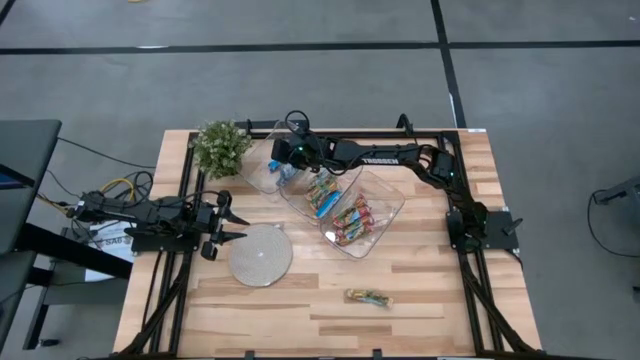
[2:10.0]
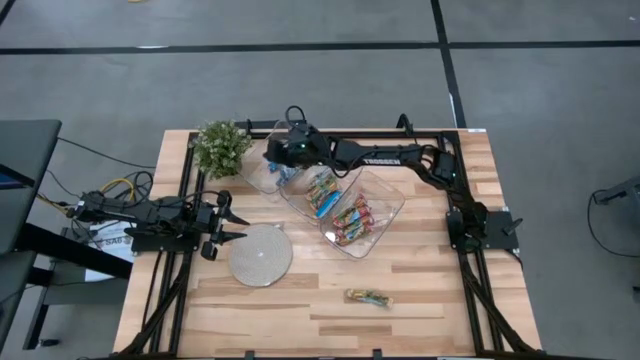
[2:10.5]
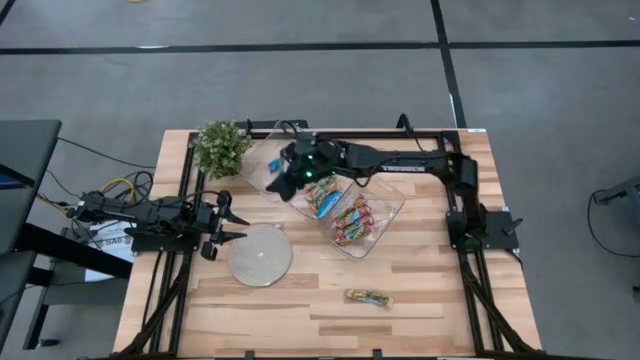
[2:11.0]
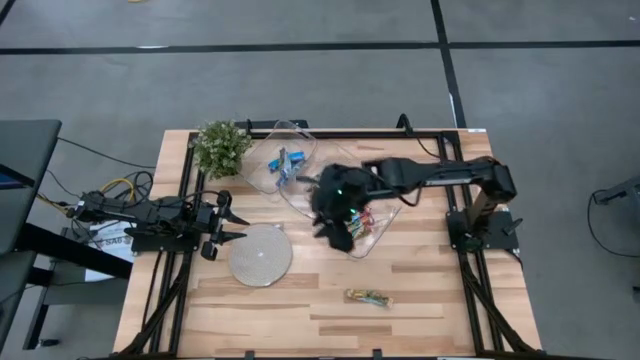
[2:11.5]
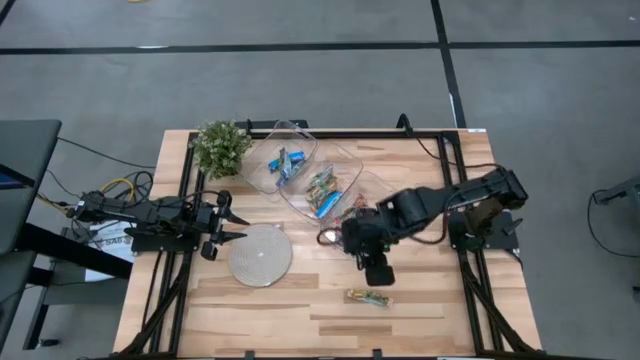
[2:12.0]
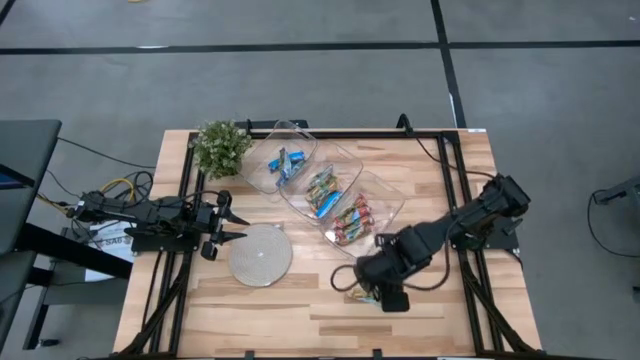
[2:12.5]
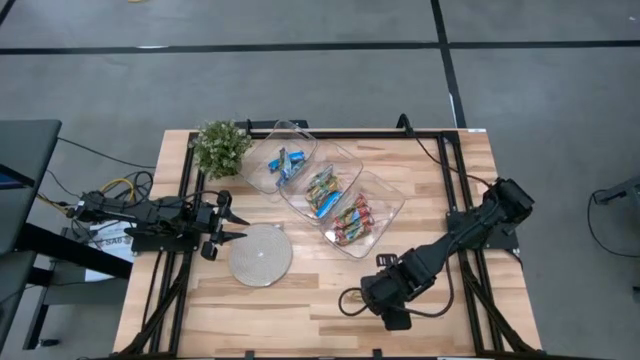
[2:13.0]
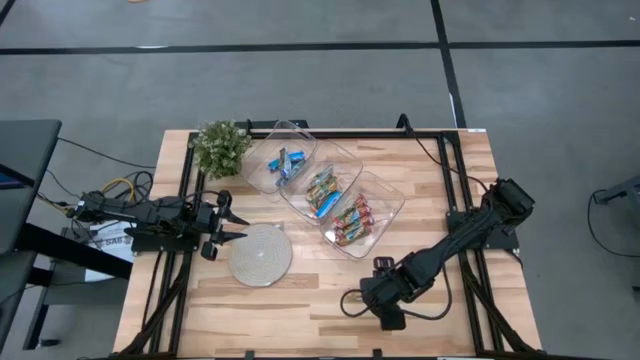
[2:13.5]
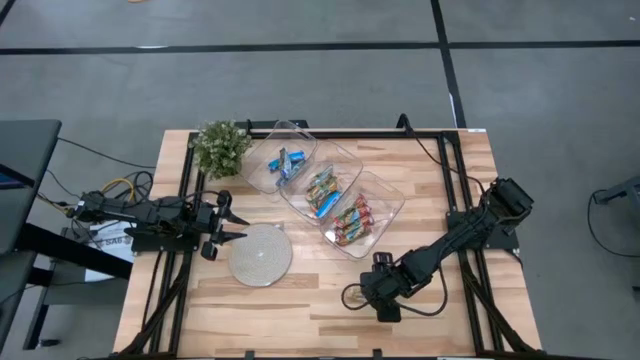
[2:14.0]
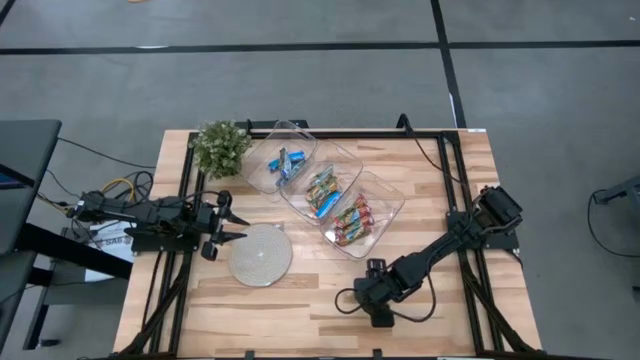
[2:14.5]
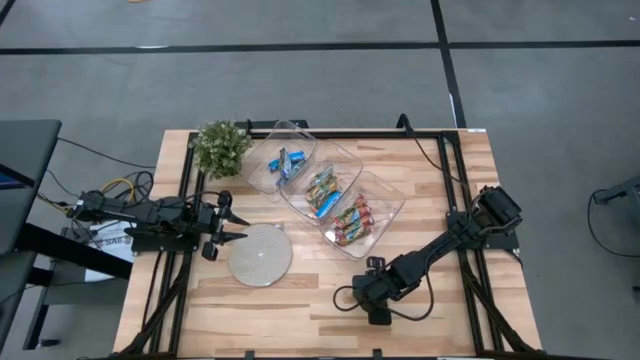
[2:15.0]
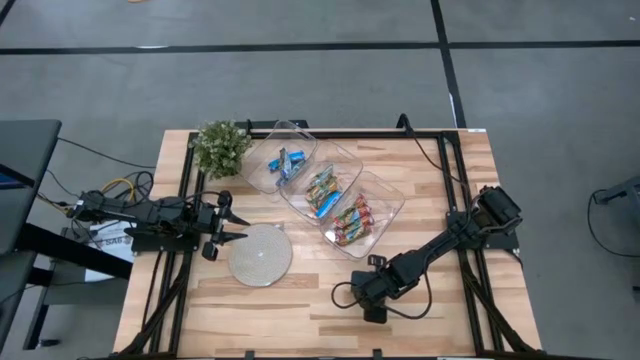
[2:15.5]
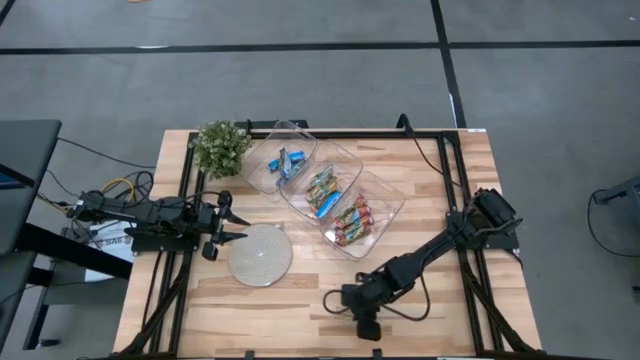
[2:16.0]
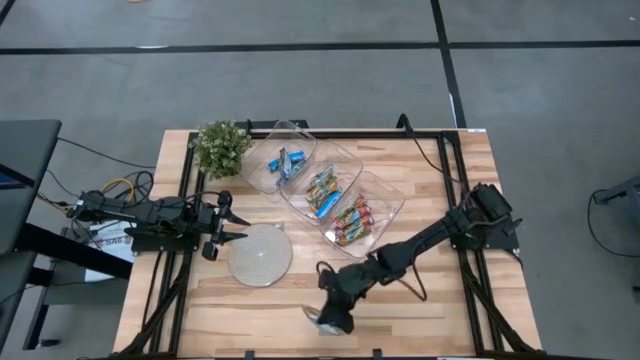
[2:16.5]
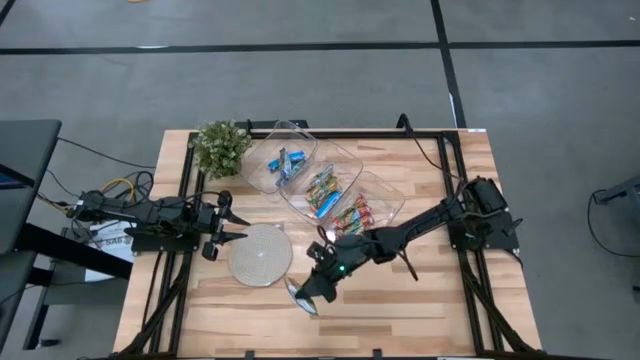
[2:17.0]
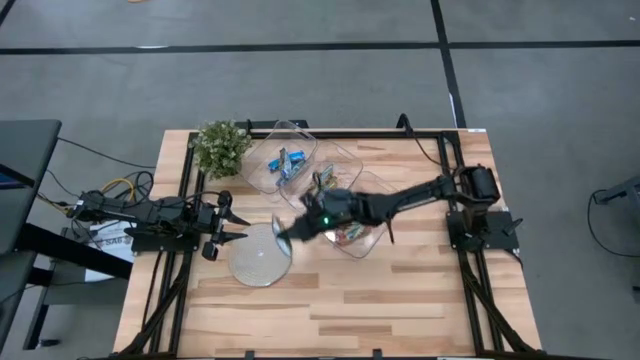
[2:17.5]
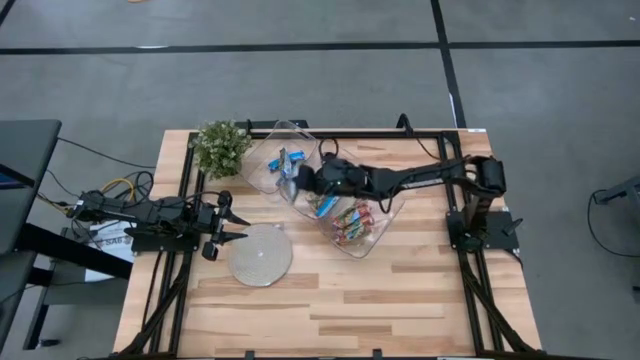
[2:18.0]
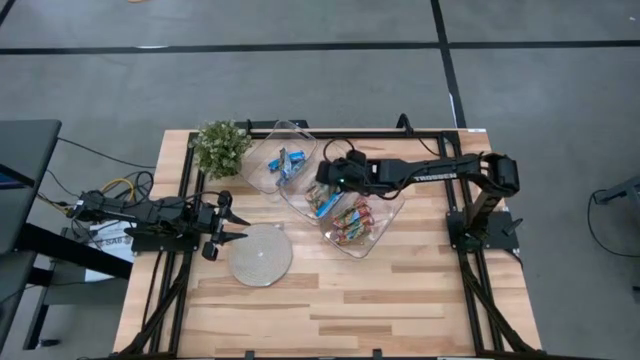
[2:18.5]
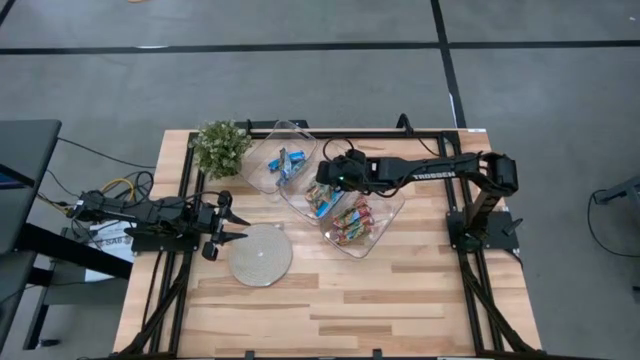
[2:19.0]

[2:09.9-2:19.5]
Task: Pick and place Granola Bars by type
Put the yellow granola bar into the middle transparent bin

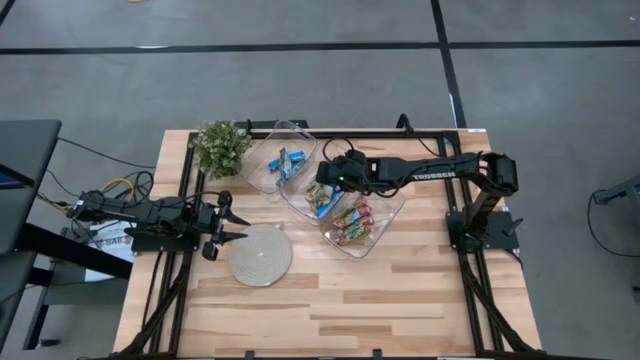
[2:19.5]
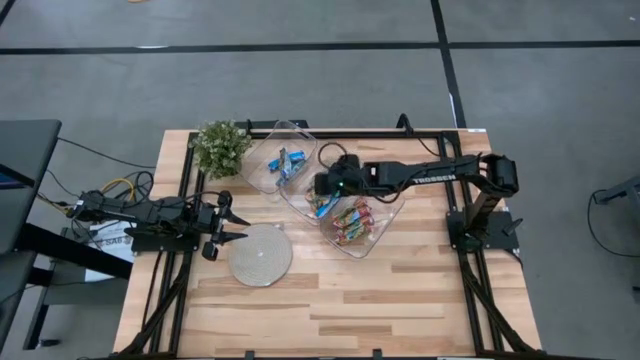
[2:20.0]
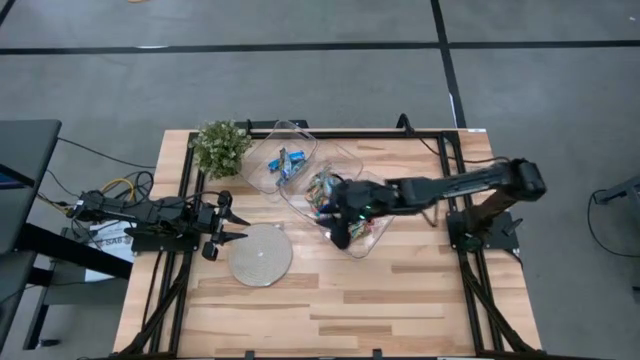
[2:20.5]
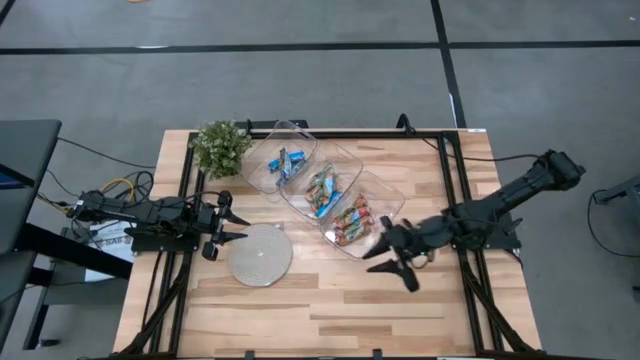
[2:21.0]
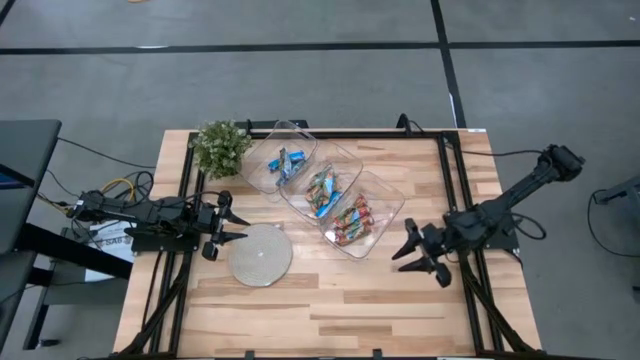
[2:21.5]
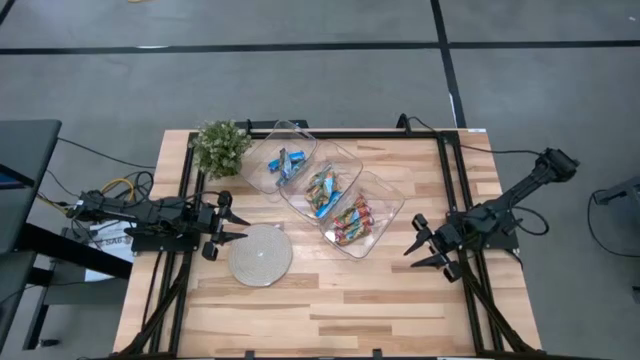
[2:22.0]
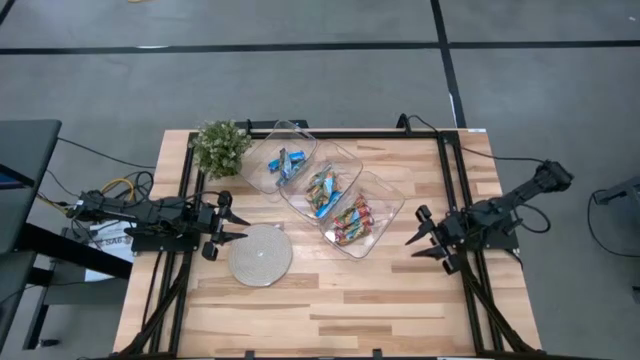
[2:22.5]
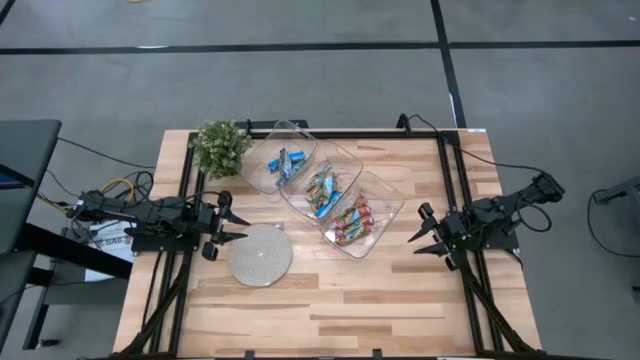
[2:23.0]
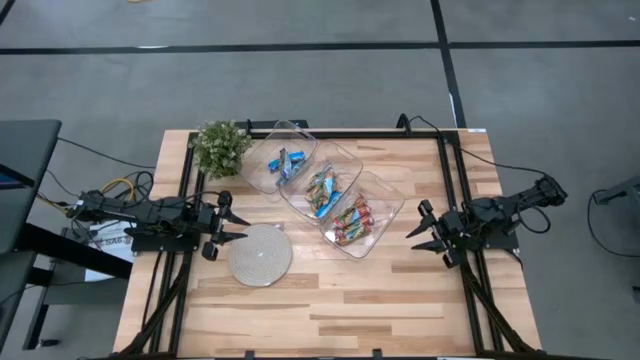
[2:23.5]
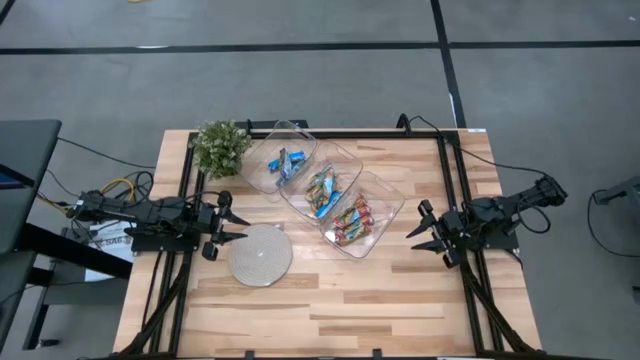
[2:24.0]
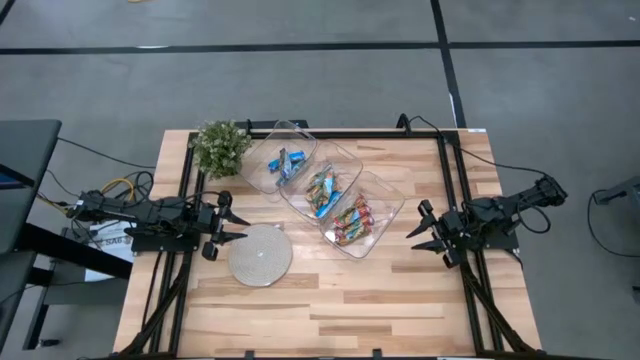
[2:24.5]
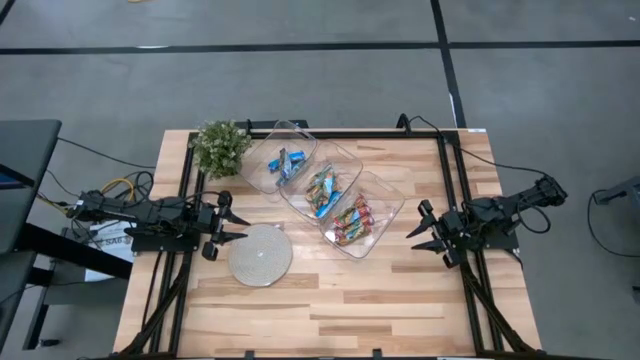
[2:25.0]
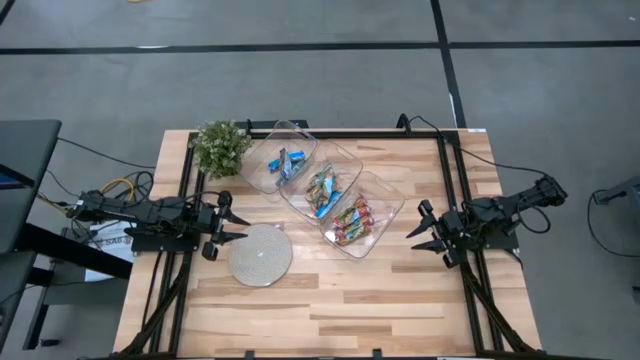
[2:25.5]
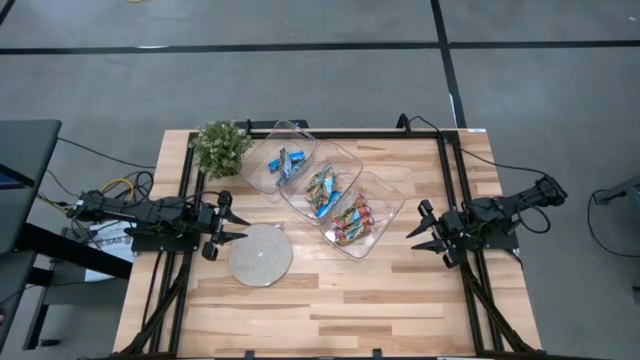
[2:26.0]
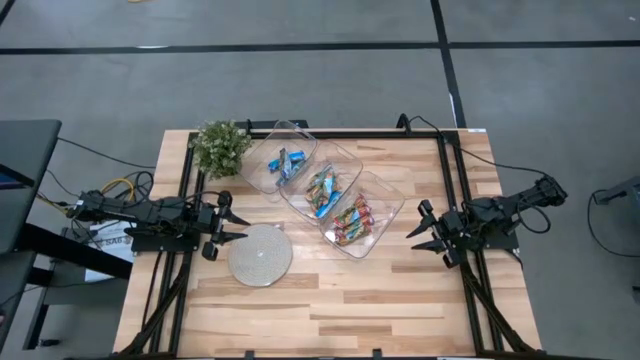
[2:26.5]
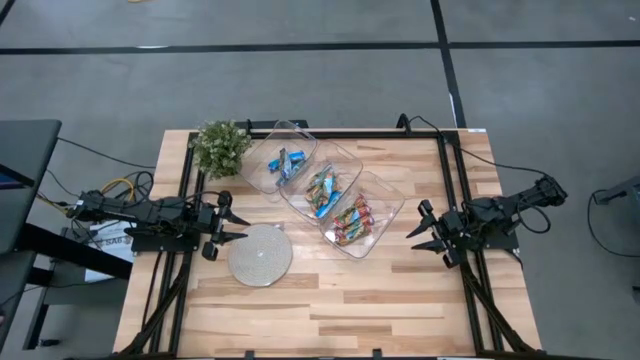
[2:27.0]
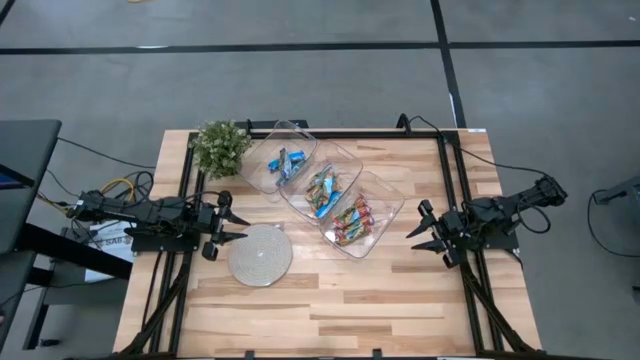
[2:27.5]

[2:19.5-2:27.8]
Return to Home Position

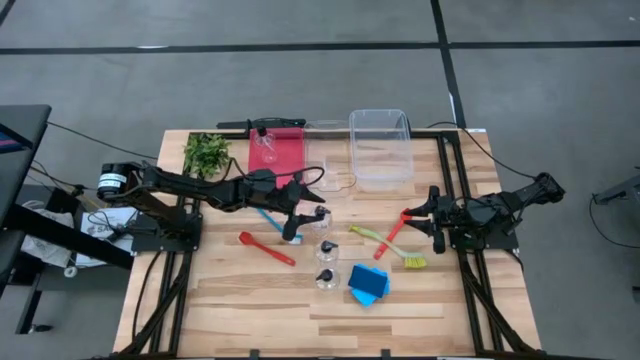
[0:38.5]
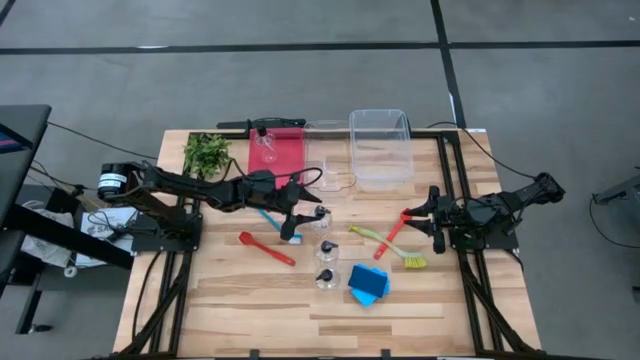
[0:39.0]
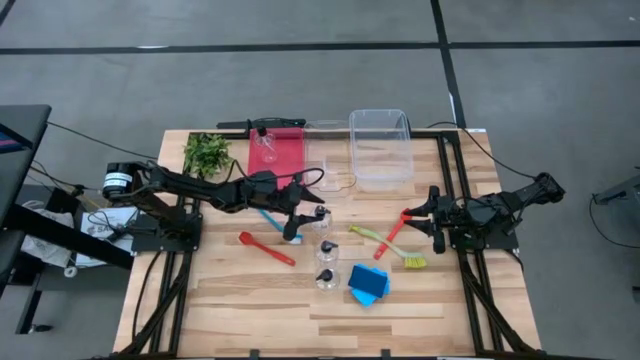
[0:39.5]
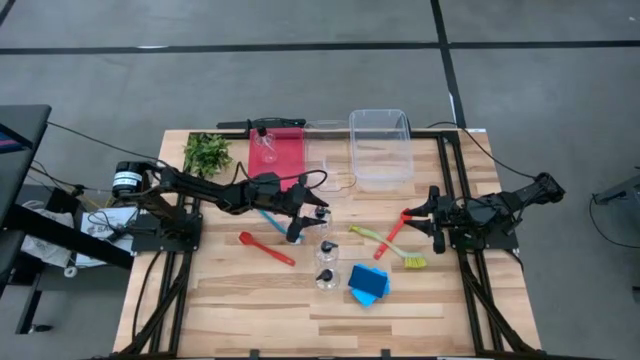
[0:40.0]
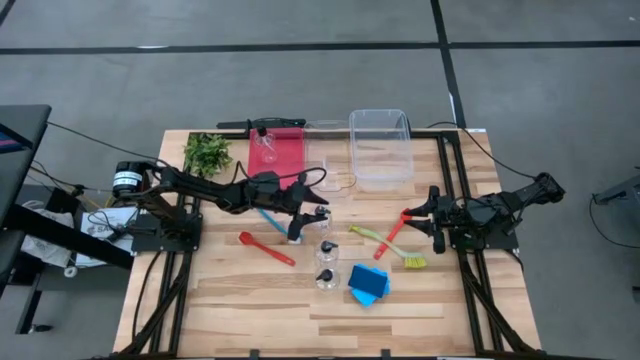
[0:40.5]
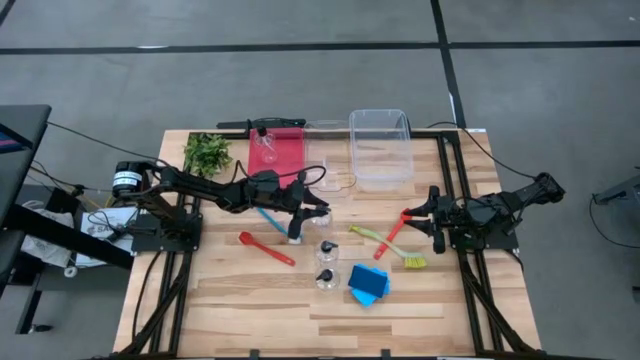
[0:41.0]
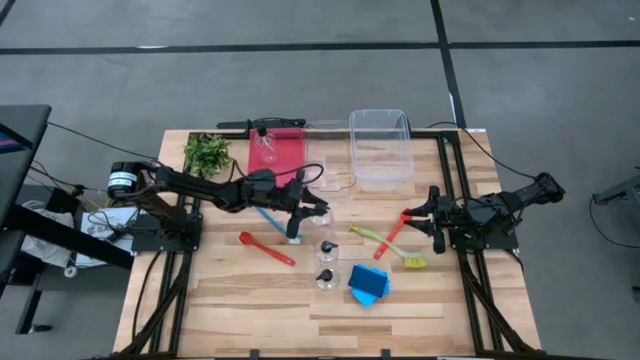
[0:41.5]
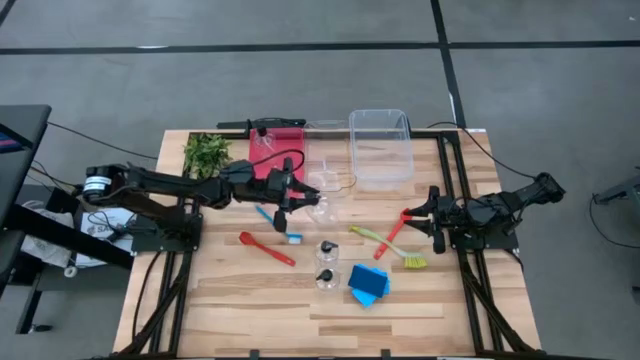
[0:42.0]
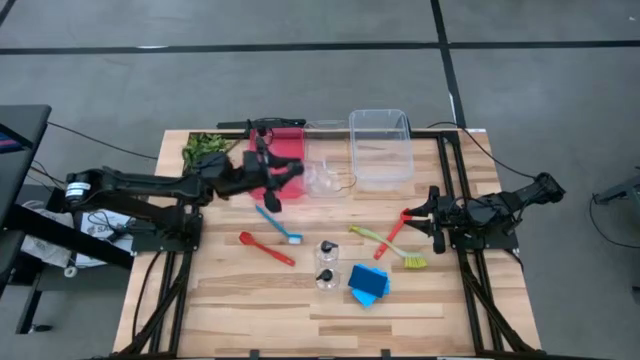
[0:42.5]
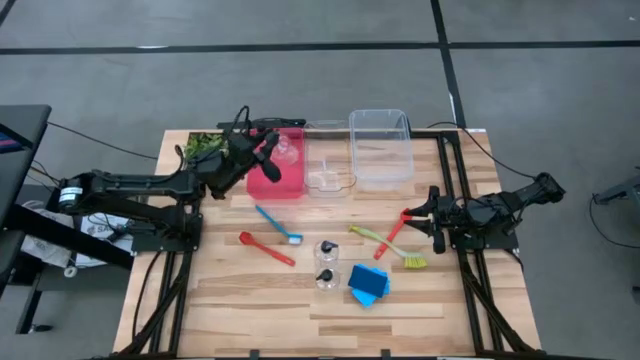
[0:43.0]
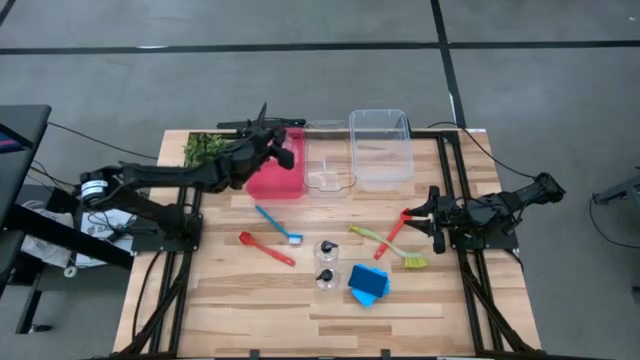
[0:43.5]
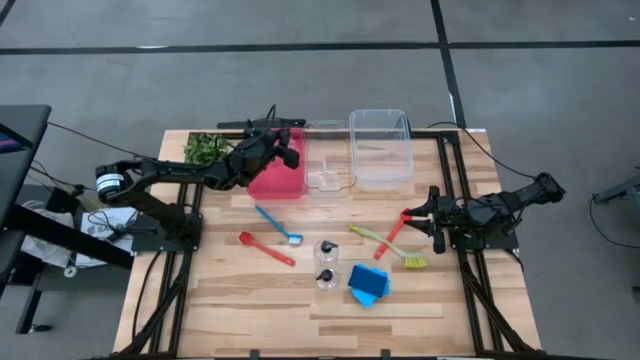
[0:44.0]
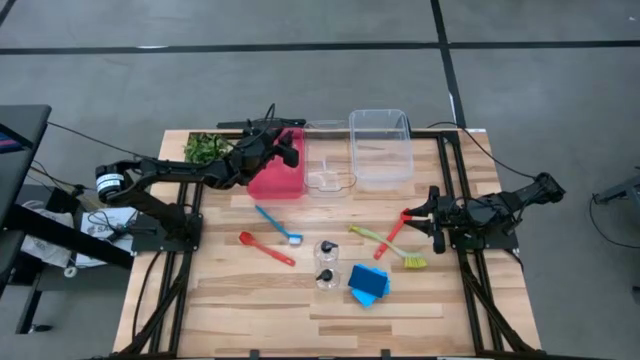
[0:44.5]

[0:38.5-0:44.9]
Task: Pick & Place Kitchen Sink Supplies
Put the spray bottle into the pink bin
